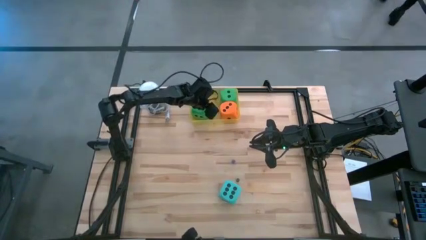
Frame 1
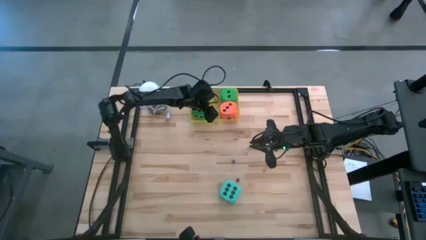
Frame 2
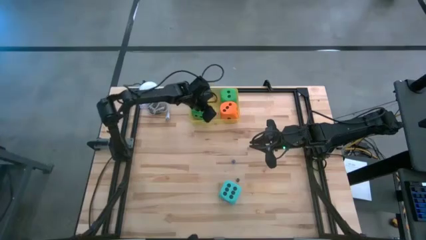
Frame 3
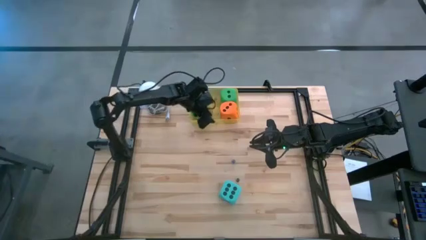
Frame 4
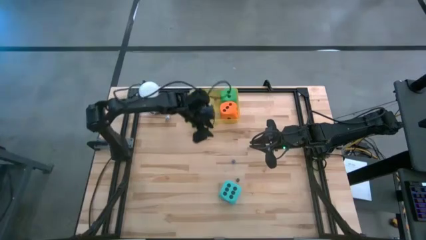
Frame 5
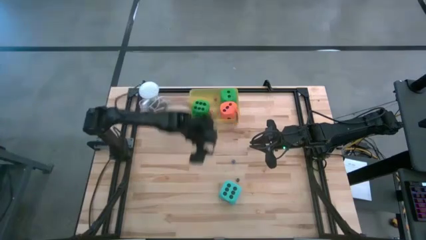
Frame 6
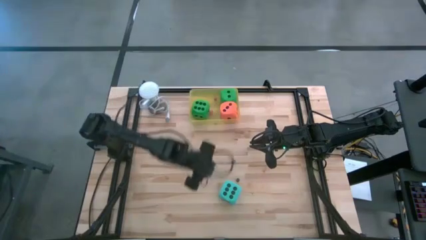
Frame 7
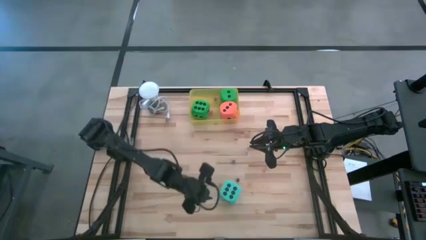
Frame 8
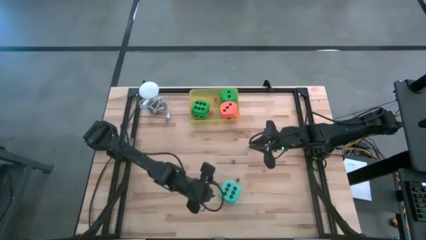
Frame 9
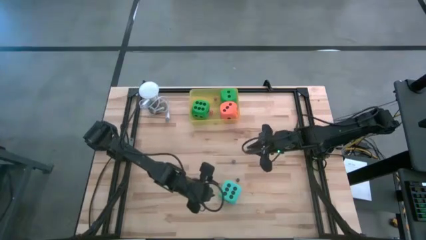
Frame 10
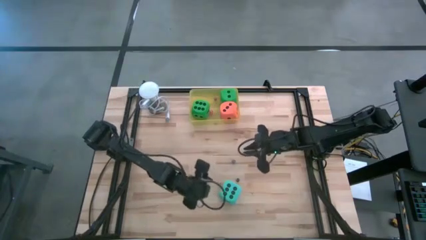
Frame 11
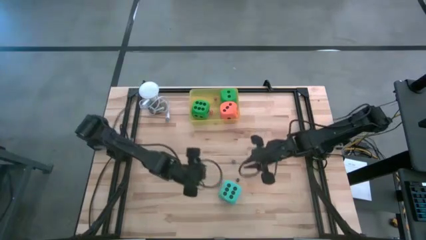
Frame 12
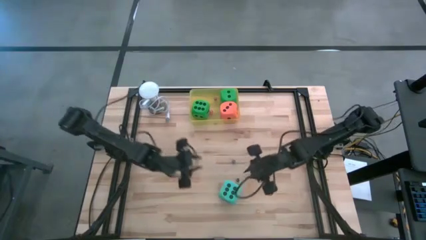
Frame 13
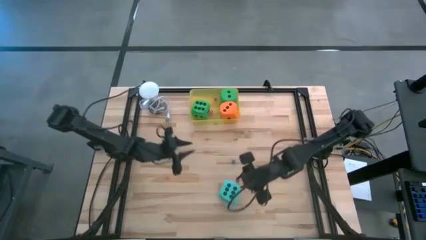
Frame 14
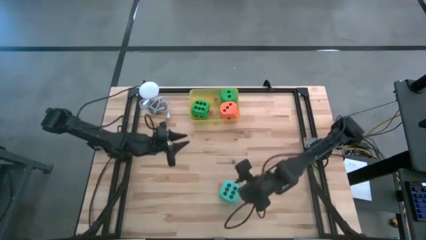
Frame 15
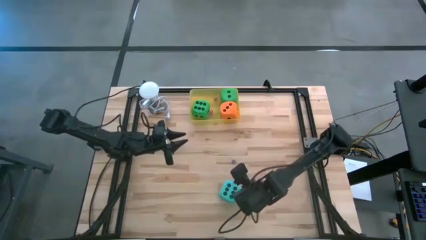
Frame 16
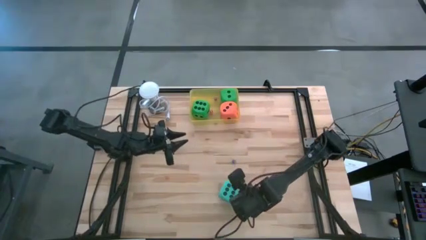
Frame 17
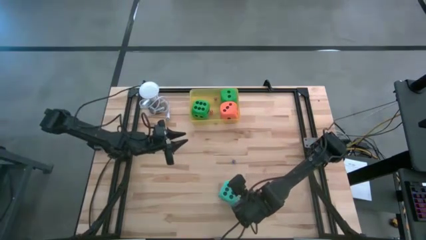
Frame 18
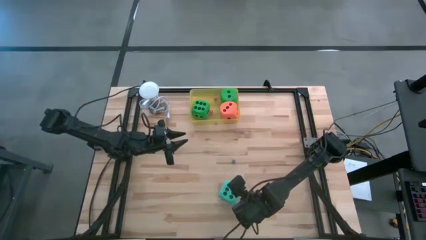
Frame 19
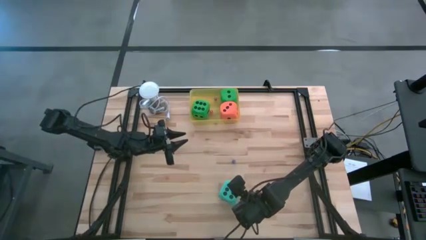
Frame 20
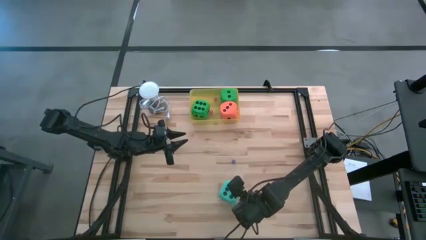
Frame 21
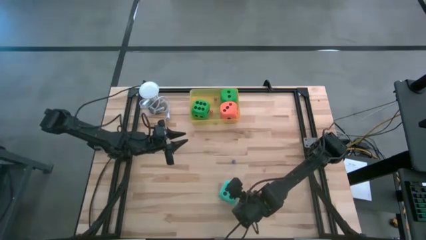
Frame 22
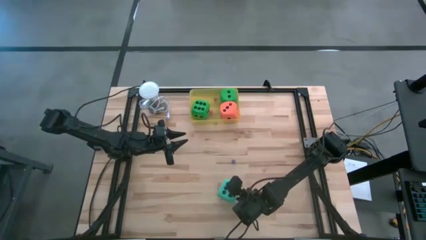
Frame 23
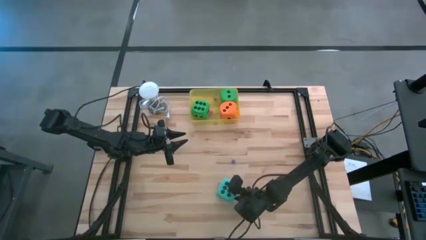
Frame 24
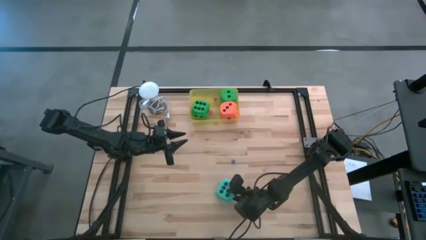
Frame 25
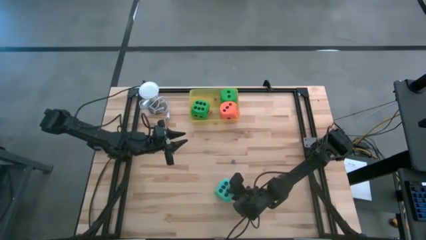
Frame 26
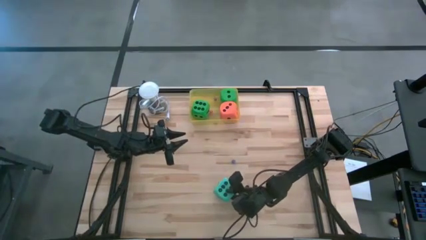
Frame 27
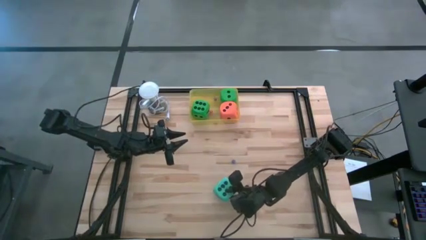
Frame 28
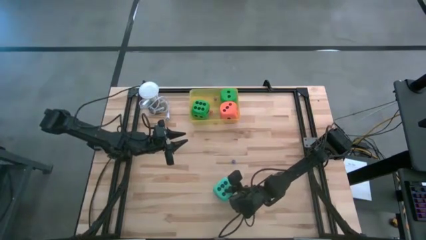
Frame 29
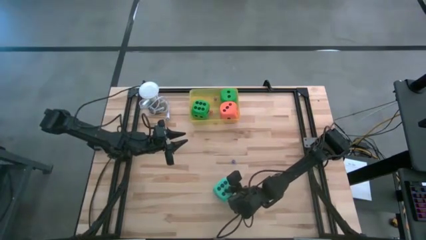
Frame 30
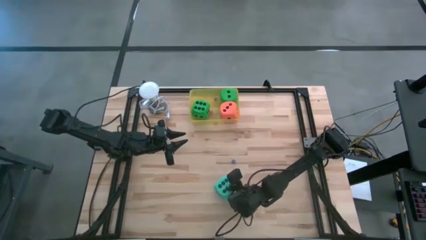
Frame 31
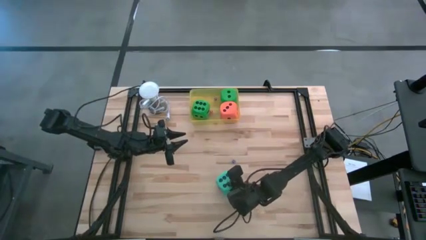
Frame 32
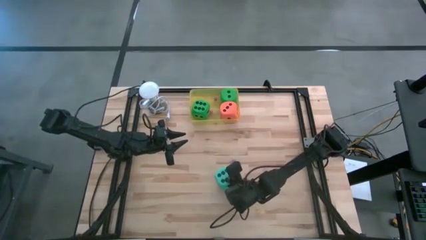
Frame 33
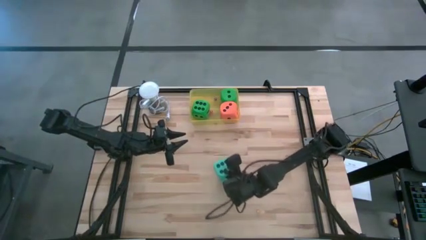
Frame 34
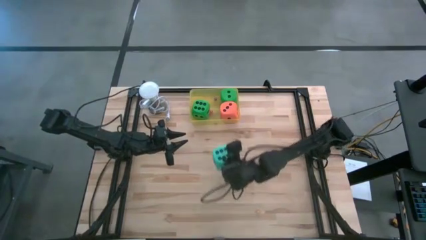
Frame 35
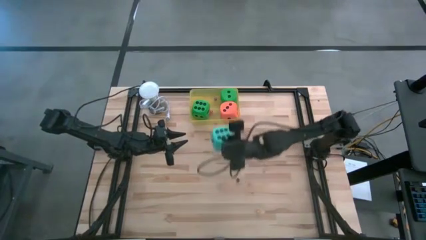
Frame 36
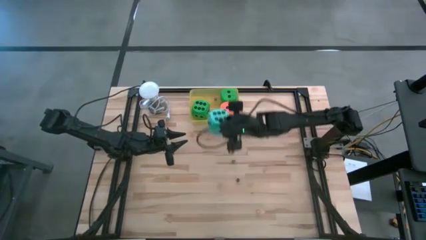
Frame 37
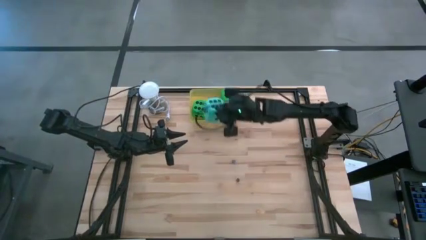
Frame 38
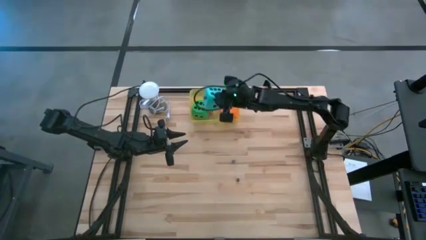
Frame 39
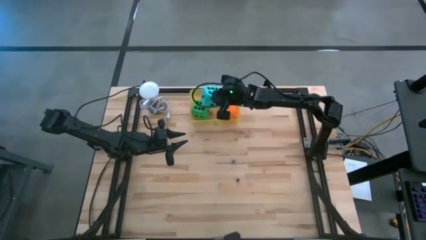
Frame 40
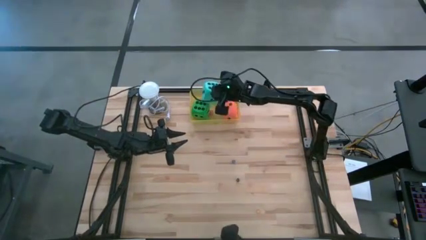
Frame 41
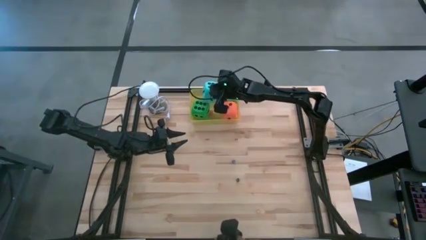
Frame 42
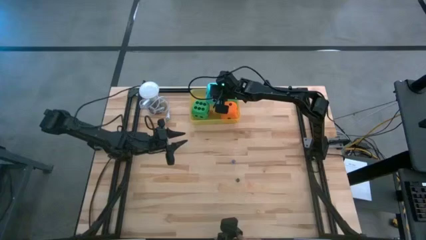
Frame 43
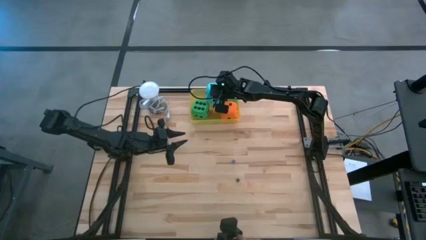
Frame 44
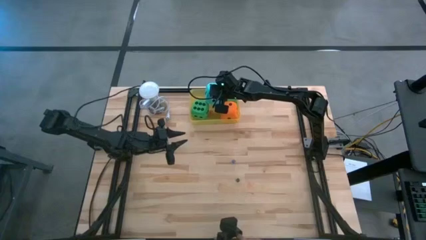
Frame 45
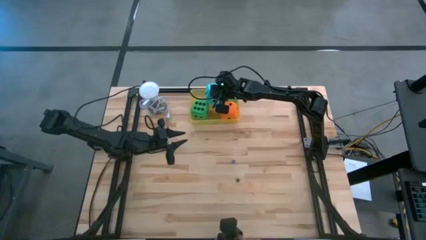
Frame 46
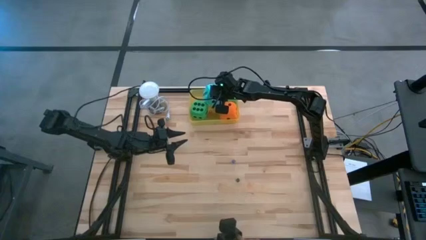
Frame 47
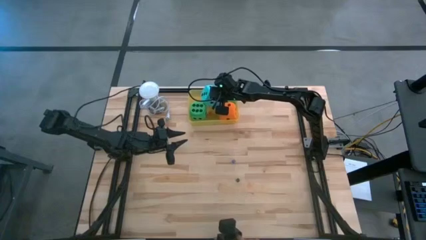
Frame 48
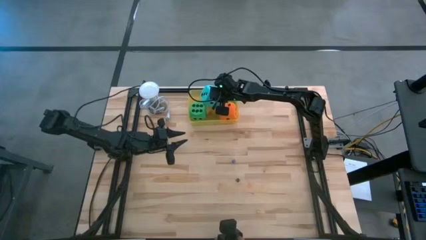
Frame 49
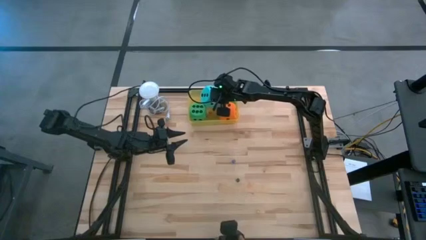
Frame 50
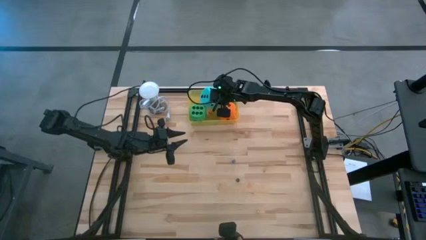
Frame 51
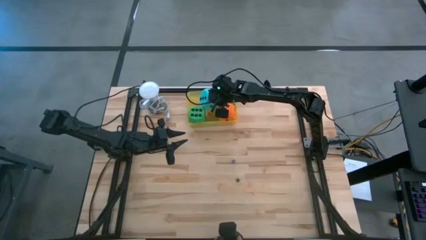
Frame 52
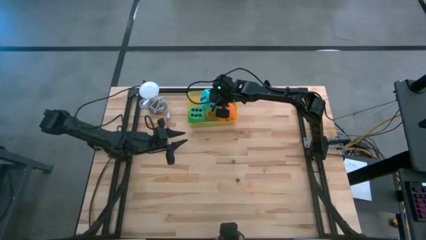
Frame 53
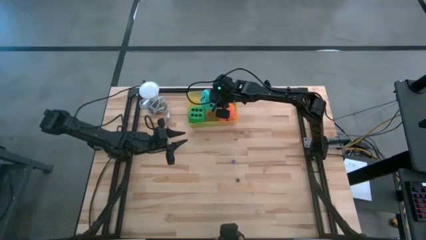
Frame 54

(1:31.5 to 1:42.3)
Task: Pick & Place Dice
Put the light blue large die into the yellow bin

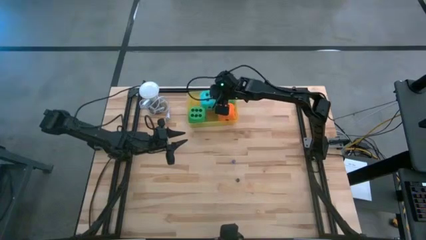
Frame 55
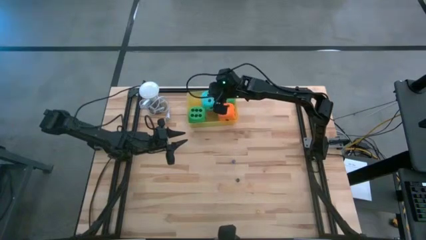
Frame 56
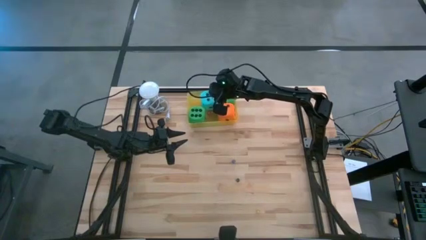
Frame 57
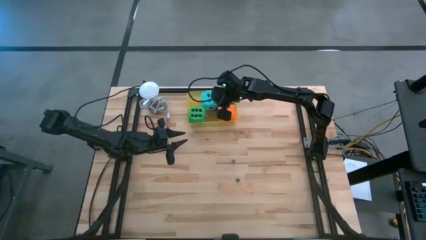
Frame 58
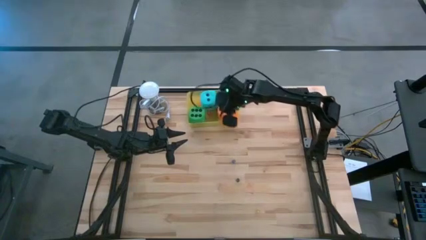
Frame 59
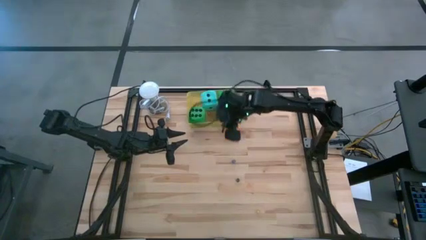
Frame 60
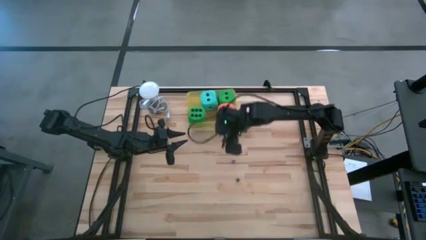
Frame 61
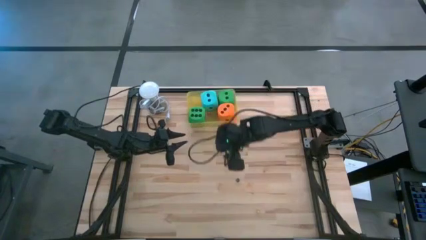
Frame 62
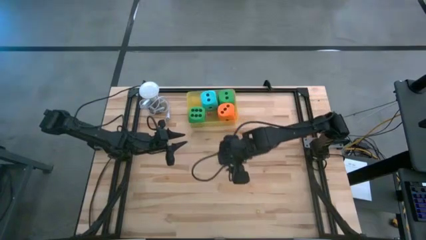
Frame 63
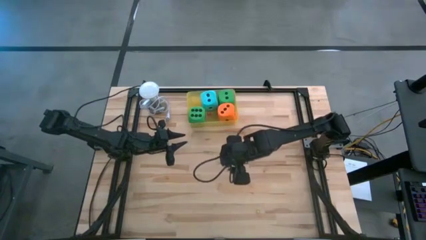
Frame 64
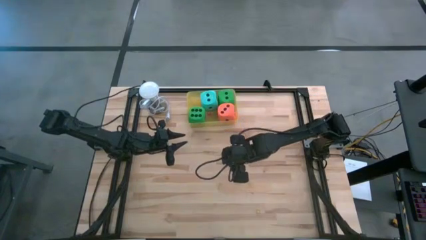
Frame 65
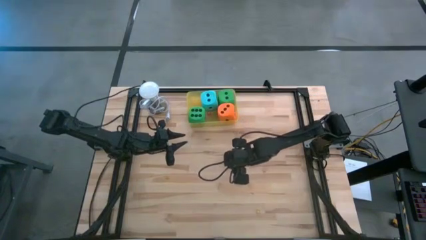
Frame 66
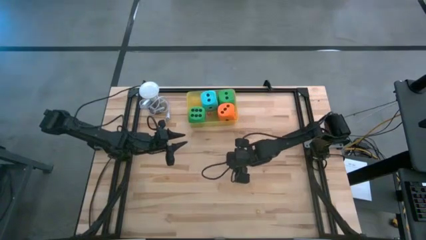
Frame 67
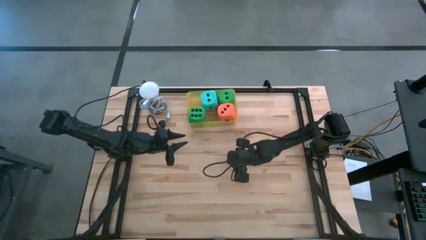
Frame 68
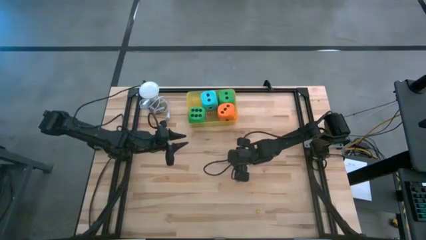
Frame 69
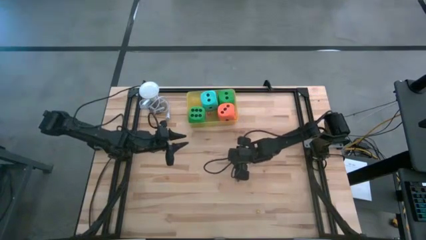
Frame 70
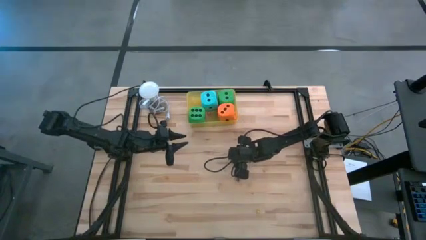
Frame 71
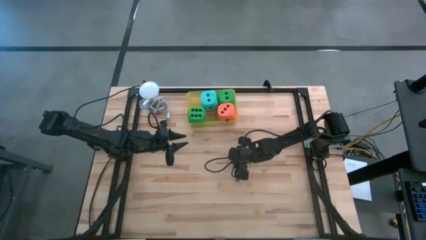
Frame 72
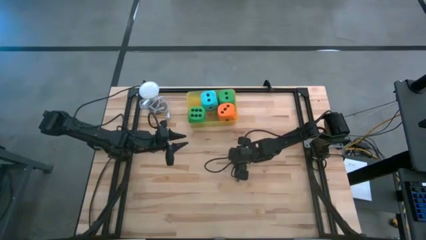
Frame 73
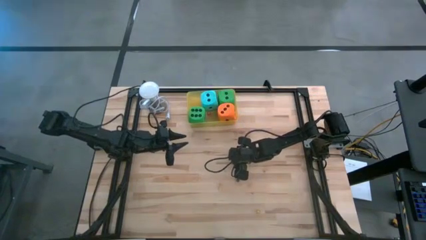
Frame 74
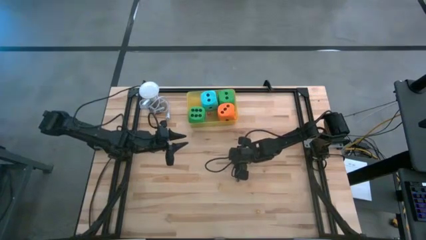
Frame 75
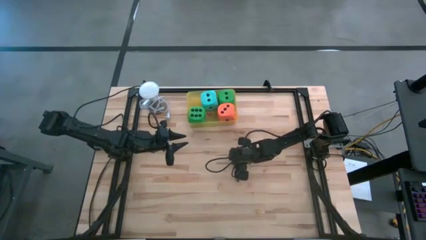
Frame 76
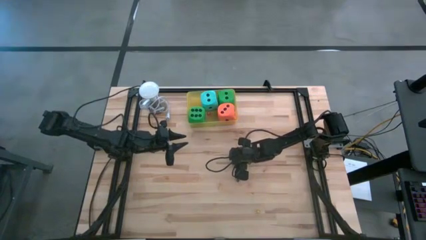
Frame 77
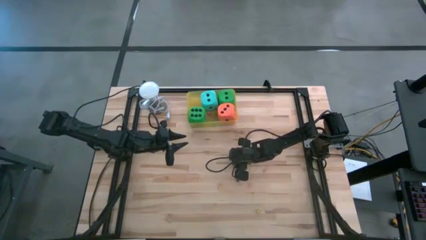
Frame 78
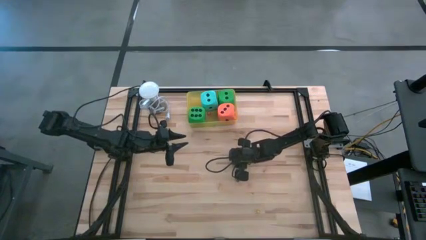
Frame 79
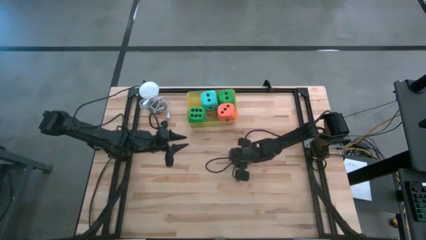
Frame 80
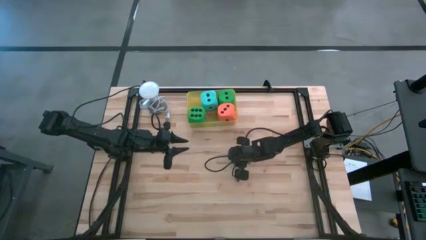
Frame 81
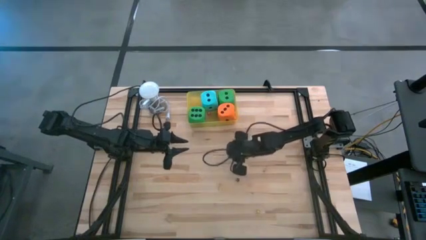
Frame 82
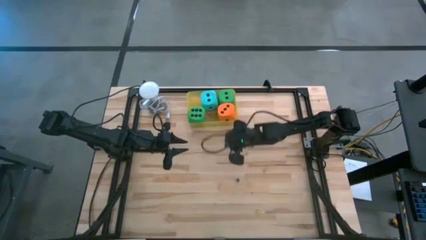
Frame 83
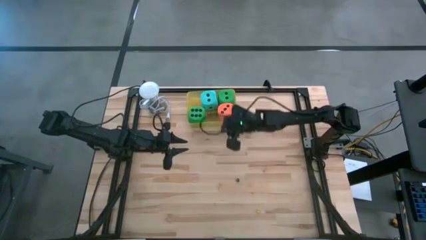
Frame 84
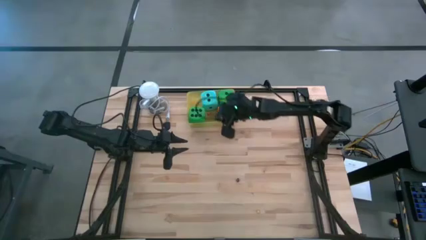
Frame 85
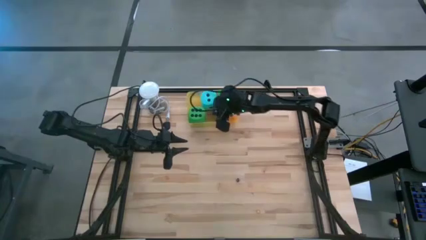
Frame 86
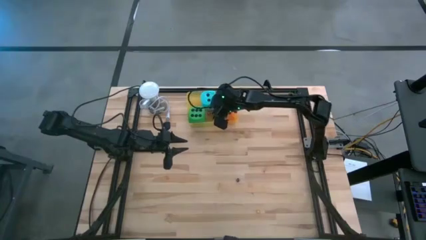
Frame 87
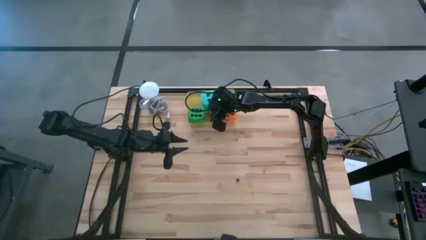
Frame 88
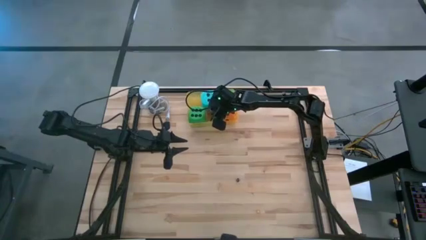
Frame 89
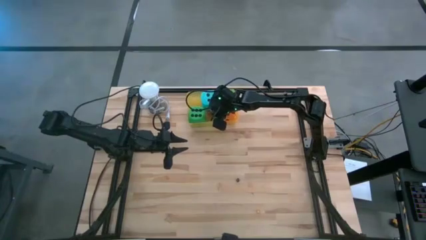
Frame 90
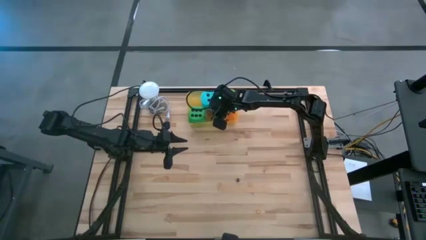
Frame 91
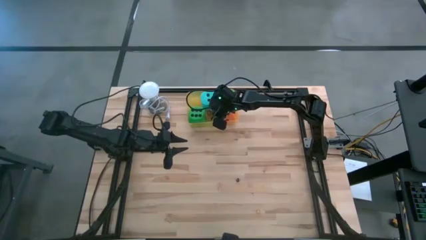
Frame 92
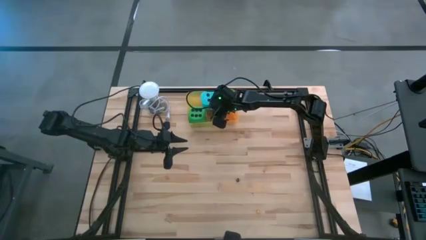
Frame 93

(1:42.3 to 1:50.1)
Put the blue small die into the yellow bin
